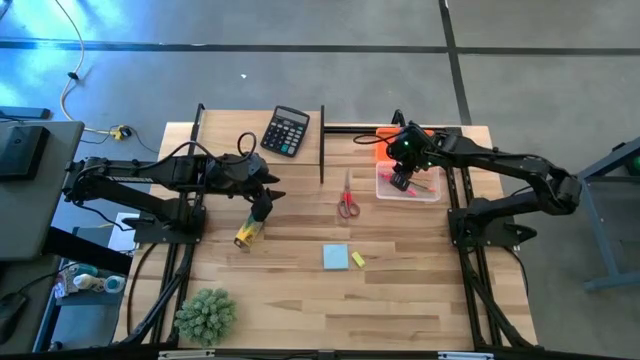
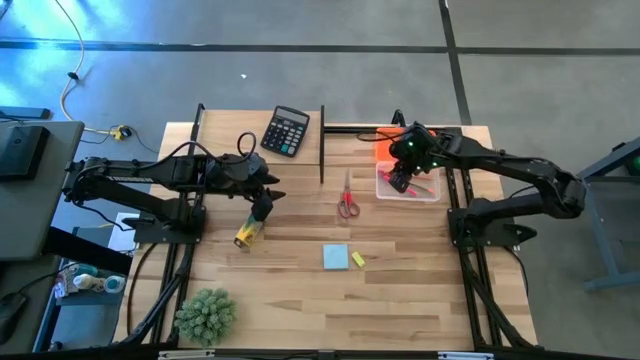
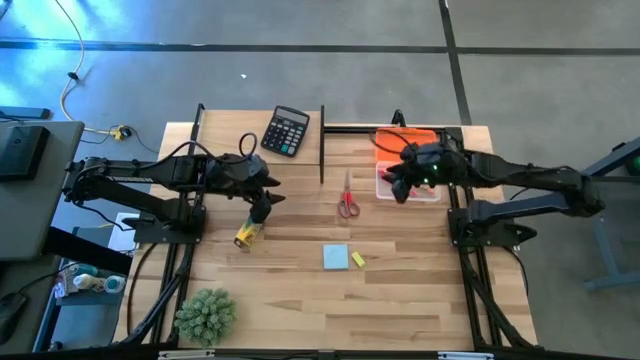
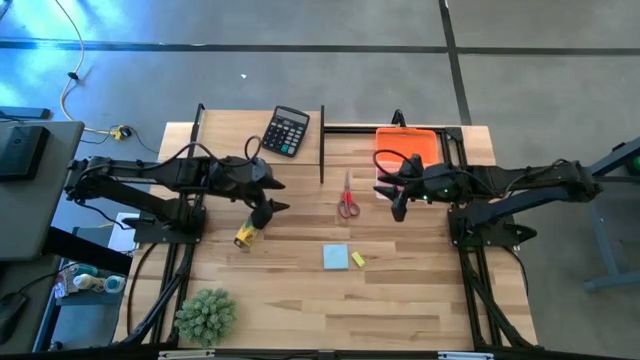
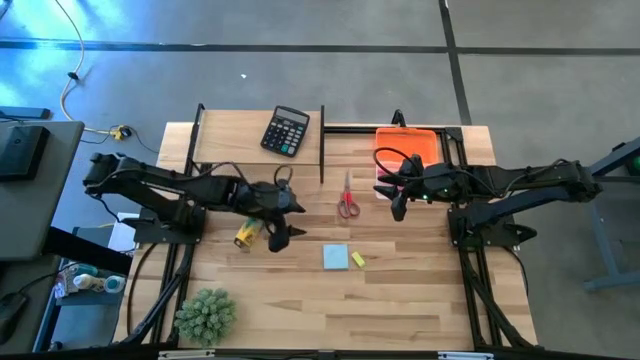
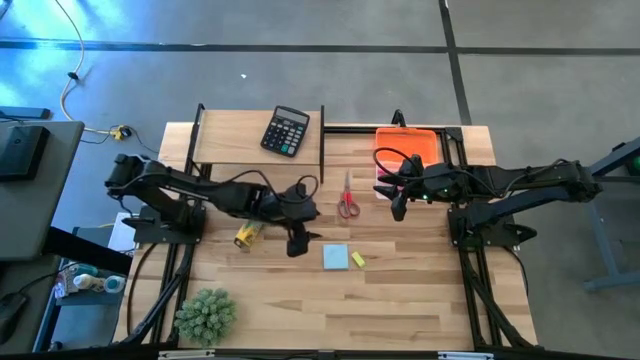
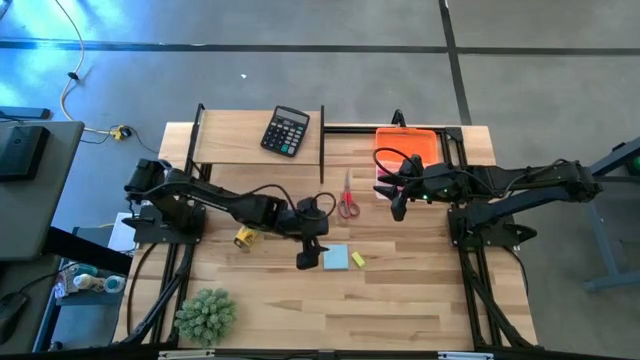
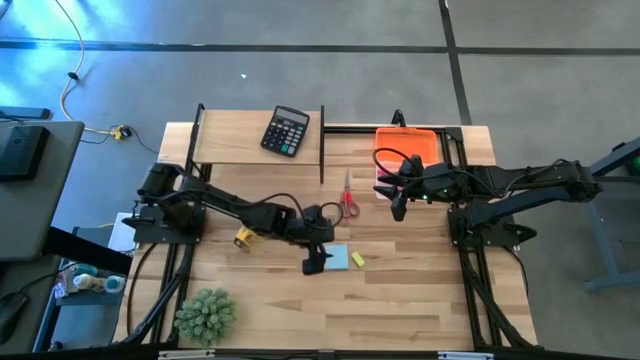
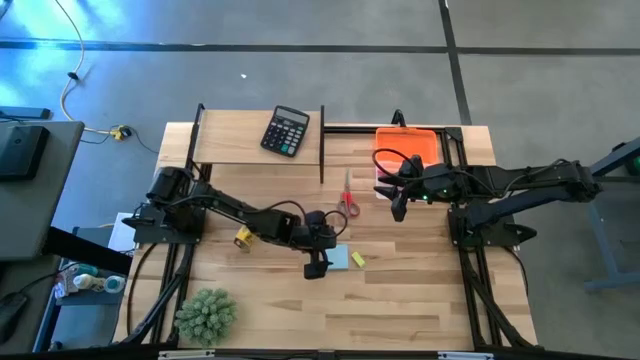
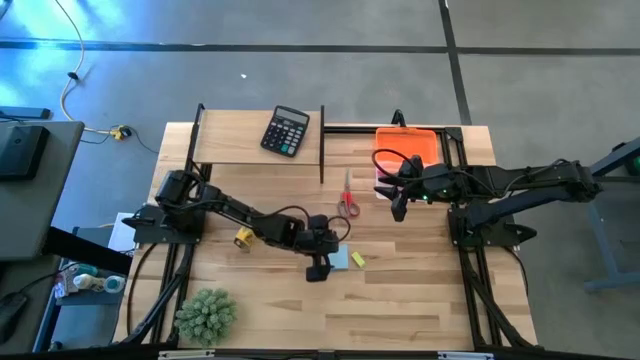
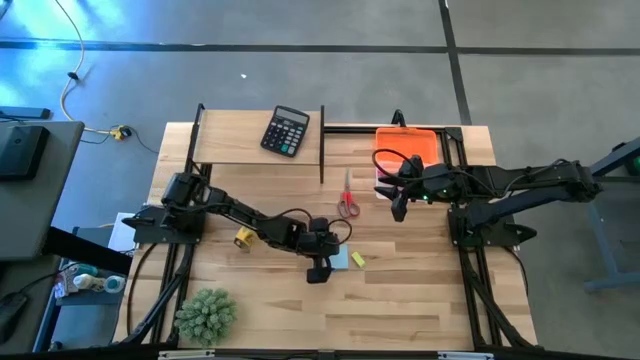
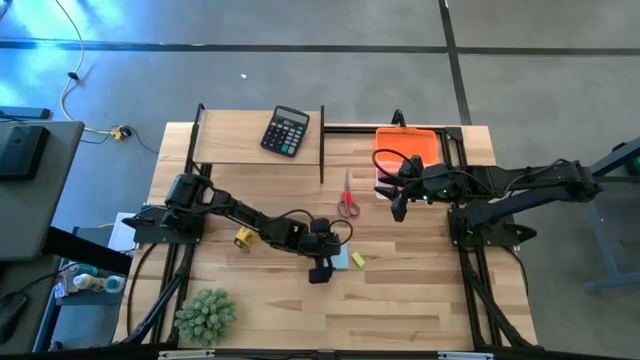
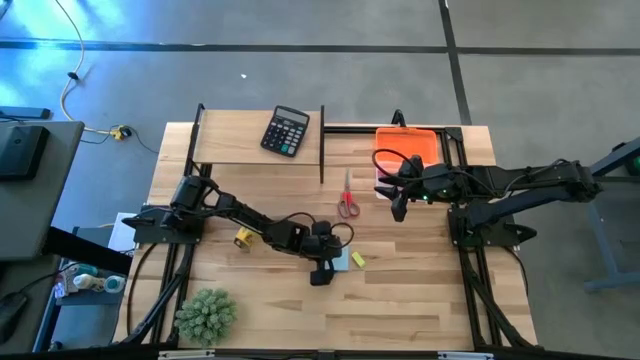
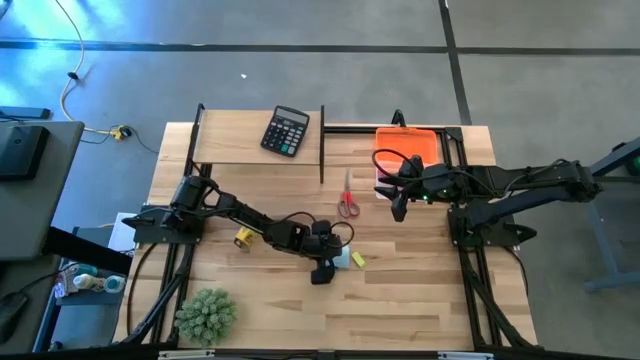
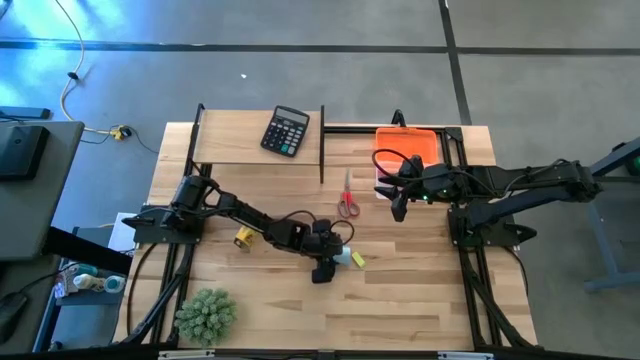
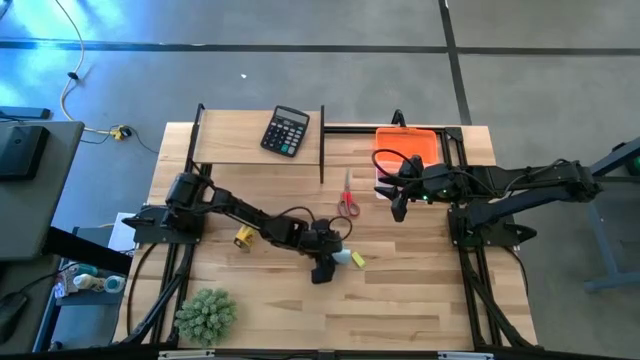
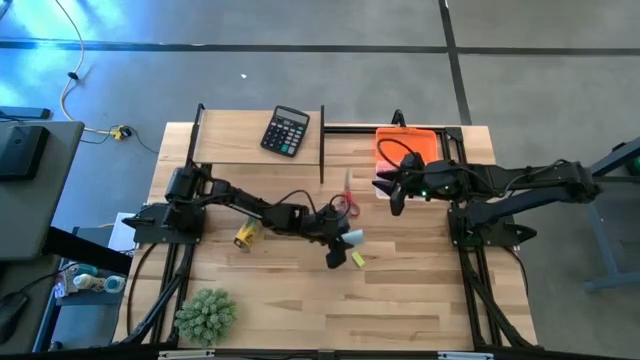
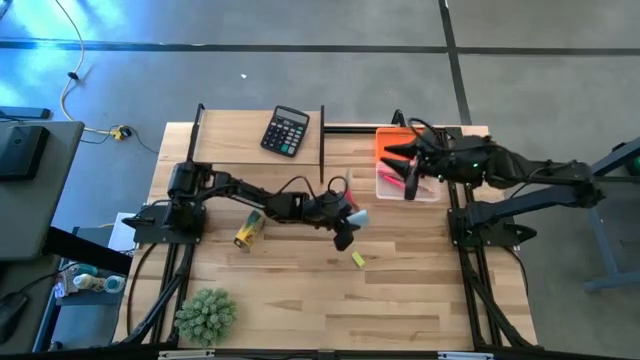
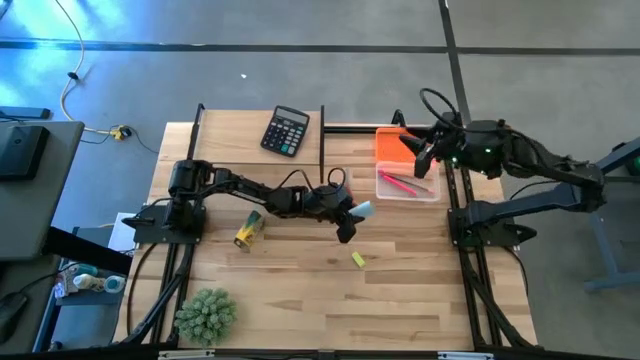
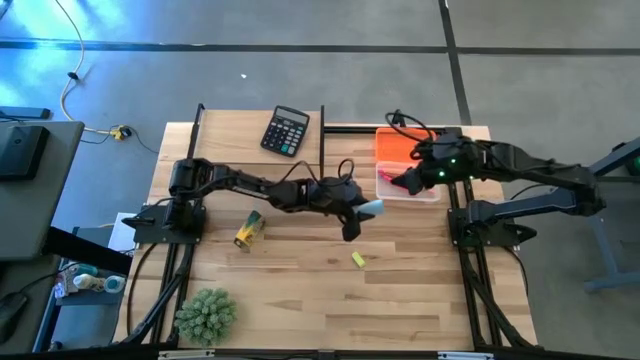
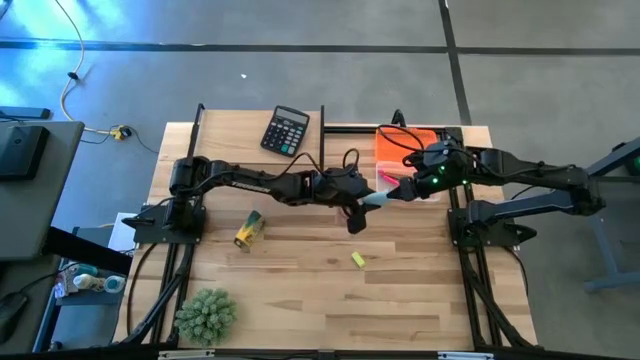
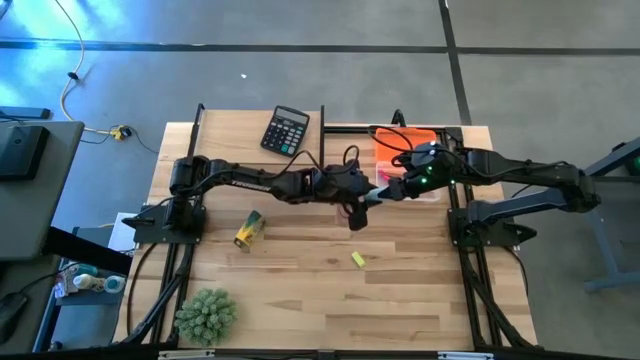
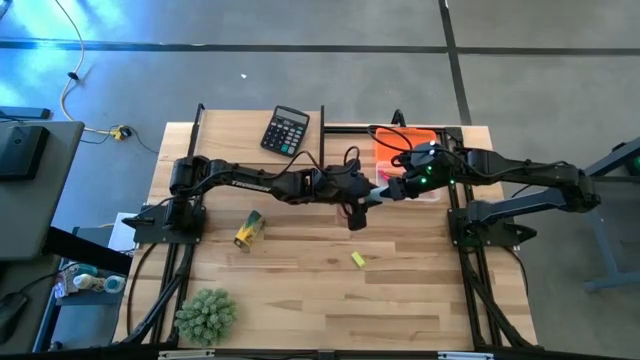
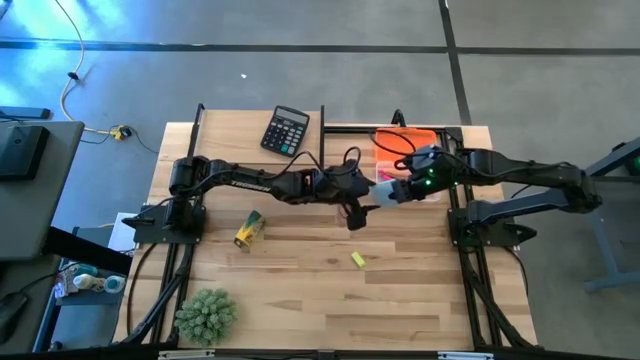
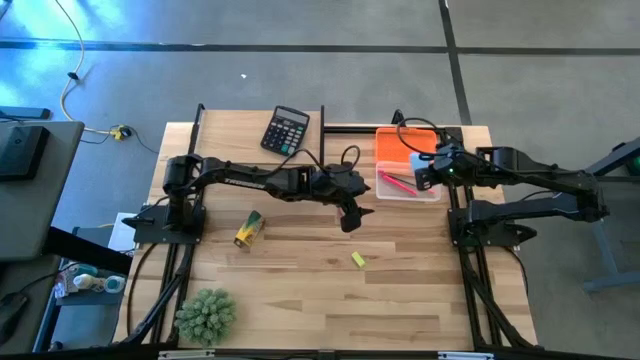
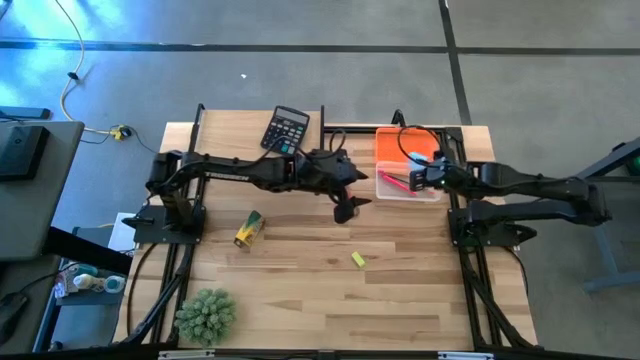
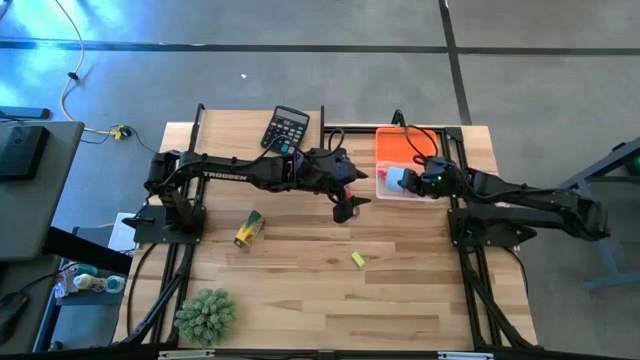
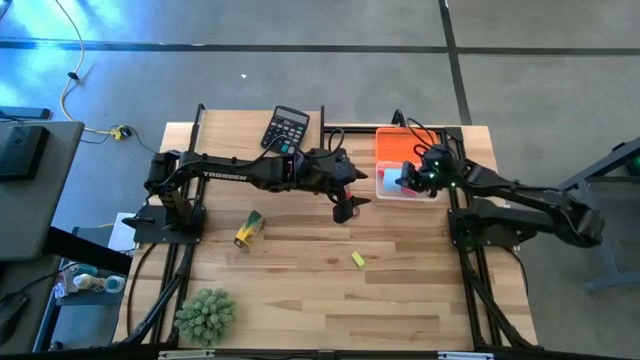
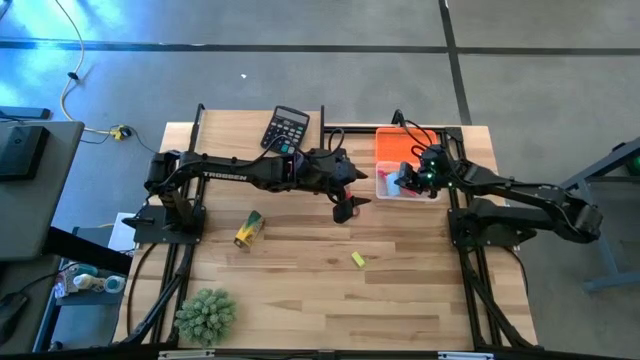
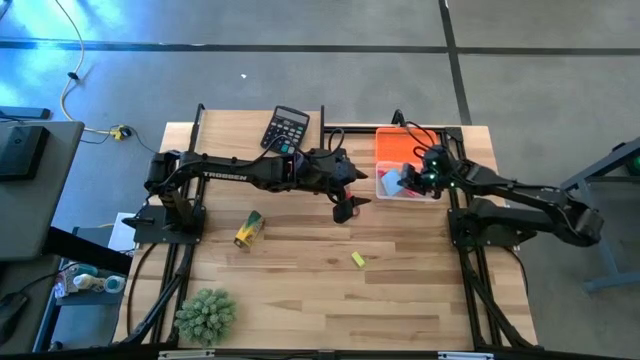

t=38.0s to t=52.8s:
Task: Pack school essentials
Put the blue sticky notes into the orange supply box

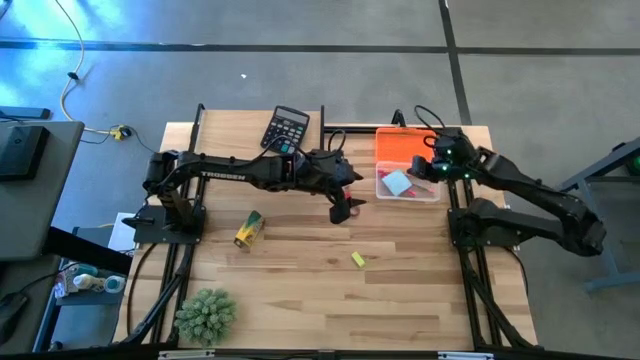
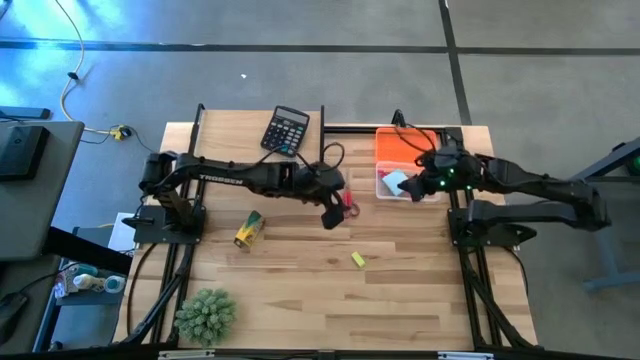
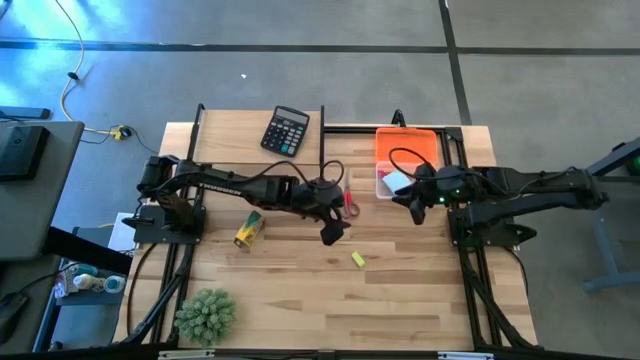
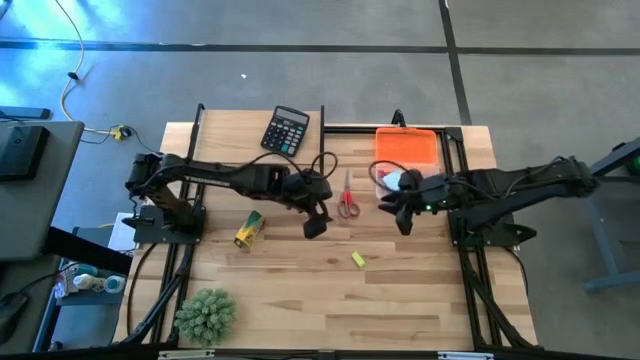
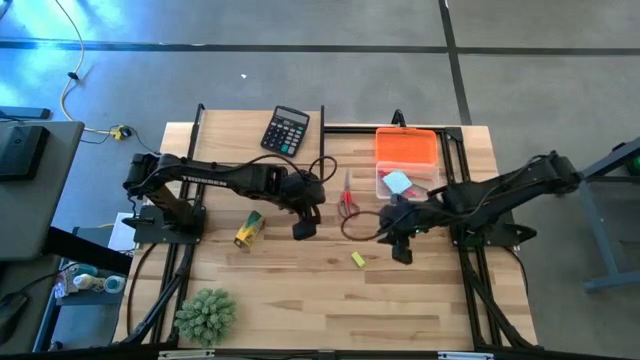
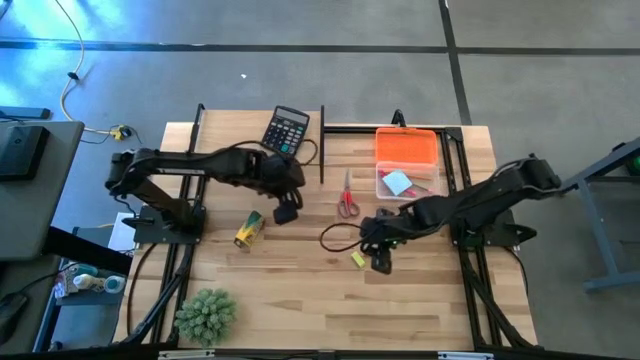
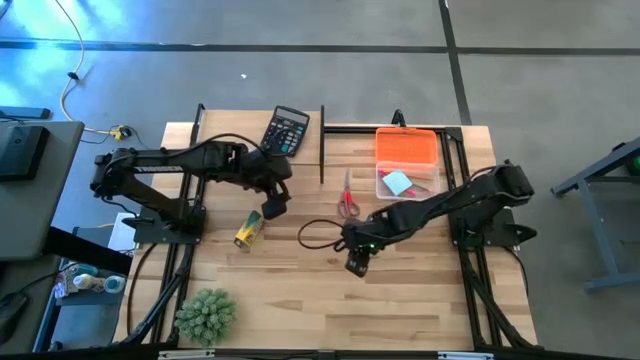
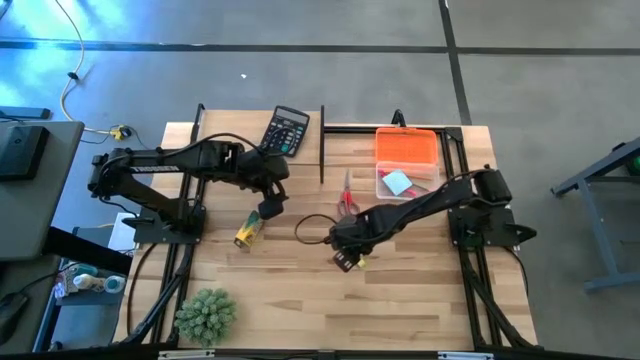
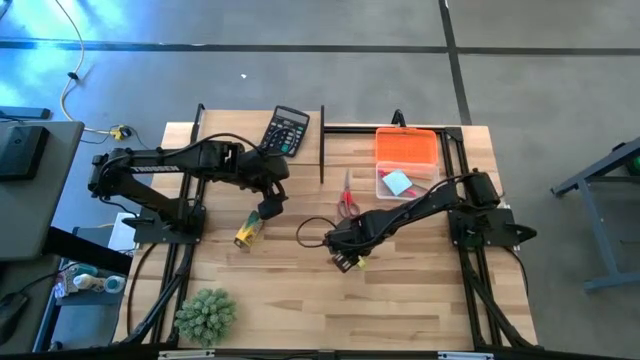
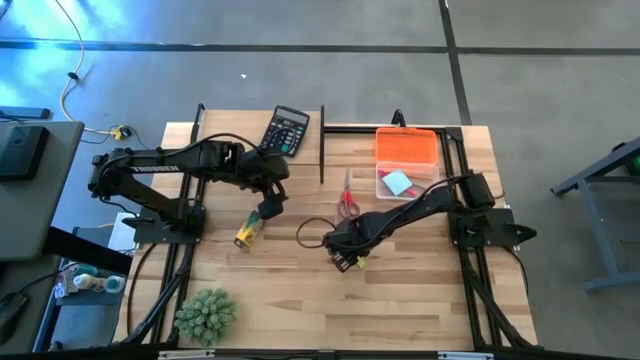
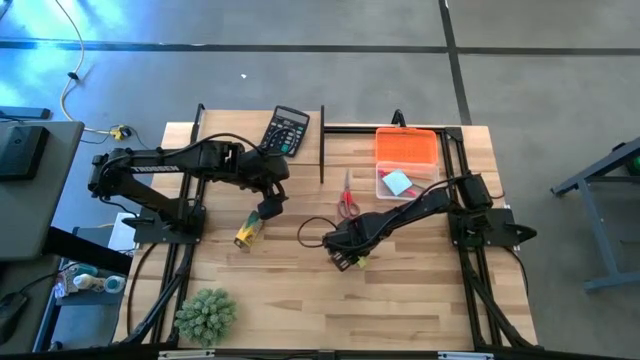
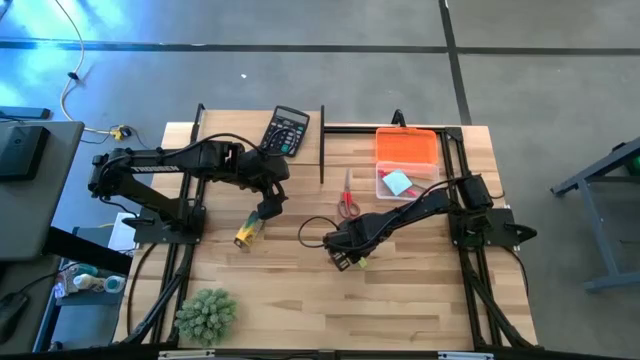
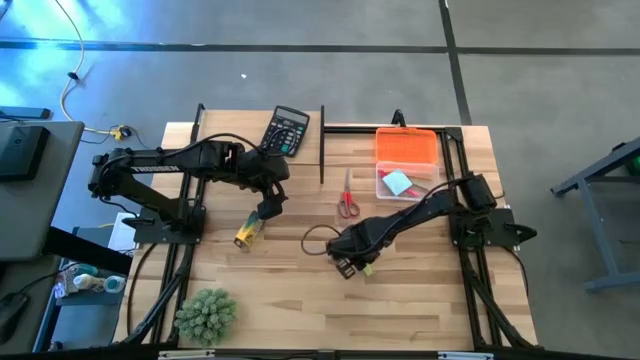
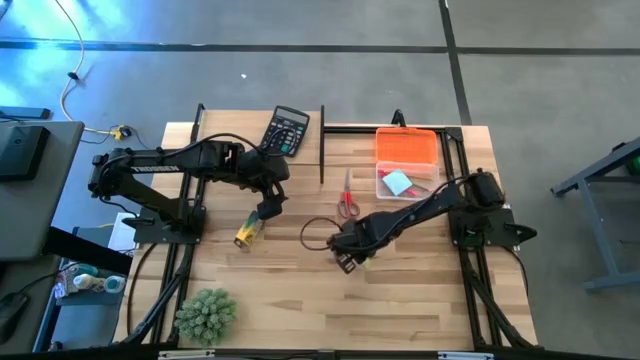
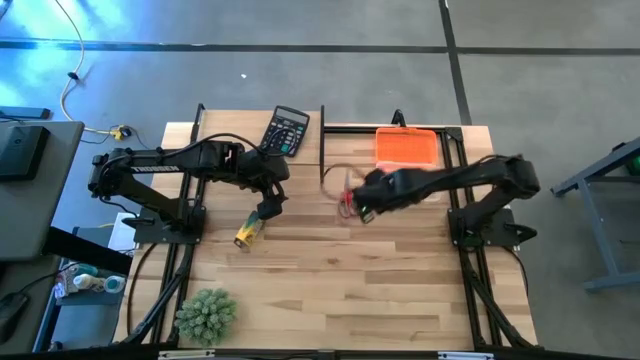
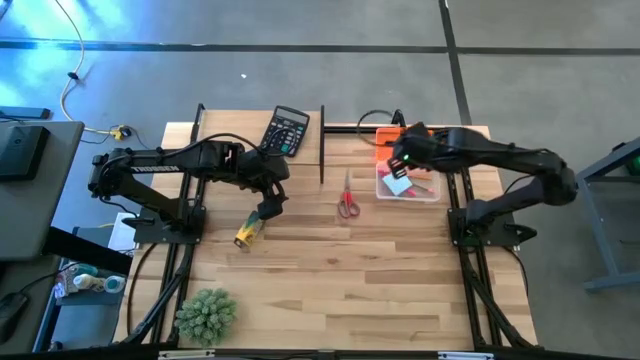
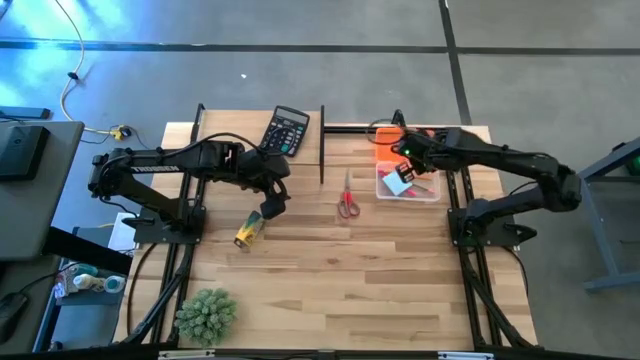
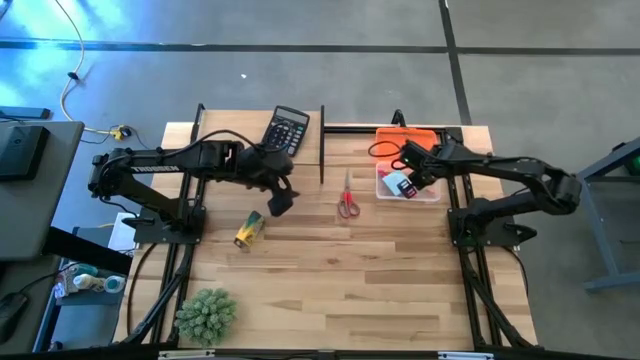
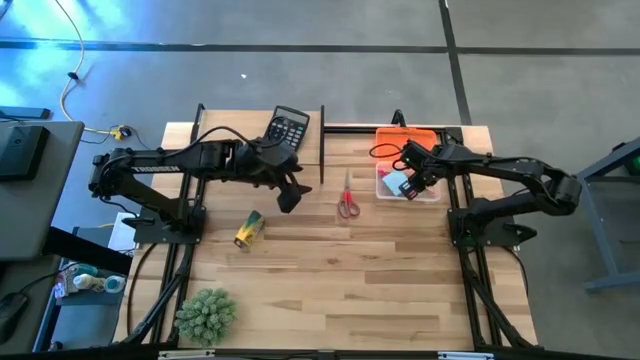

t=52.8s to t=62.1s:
Put the yellow eraser into the orange supply box
